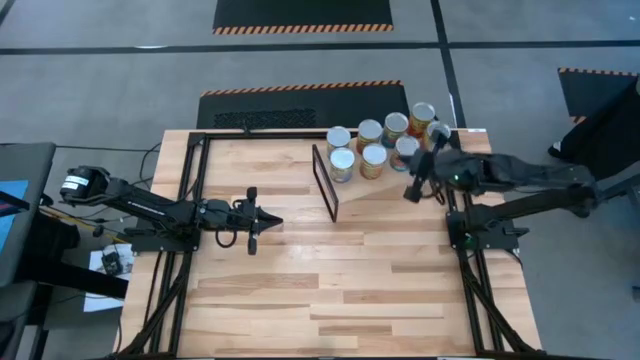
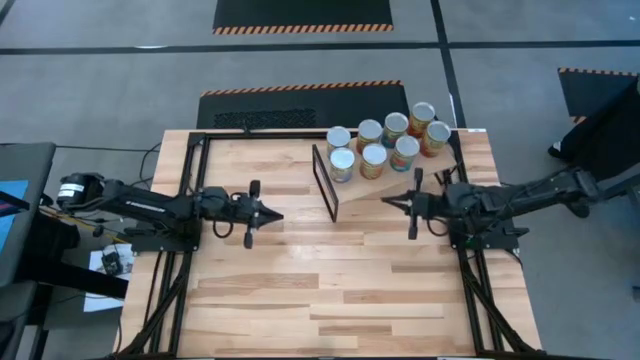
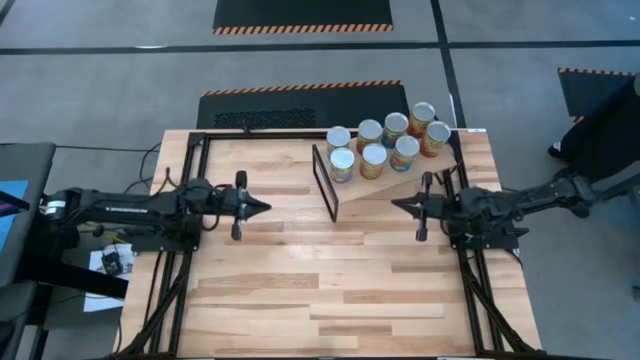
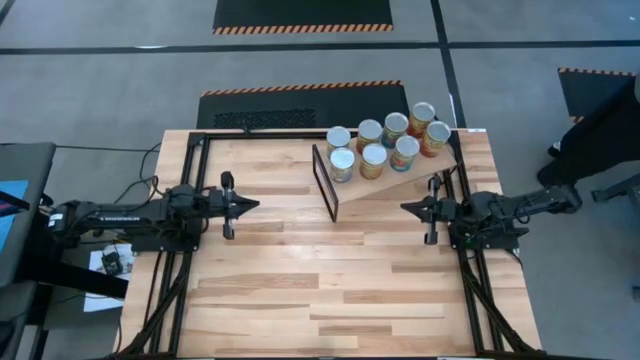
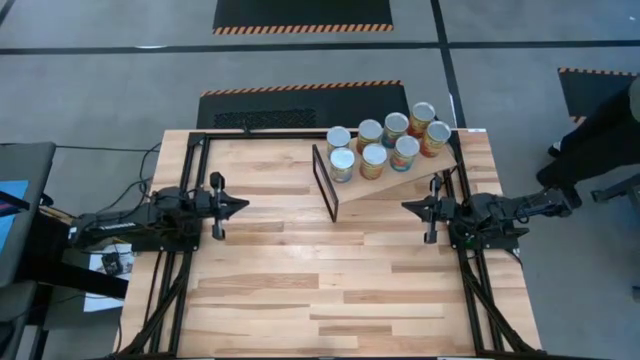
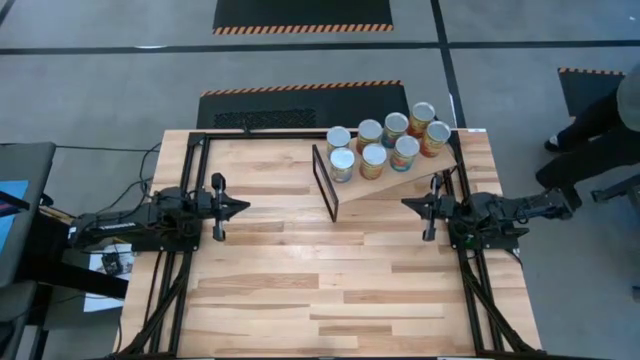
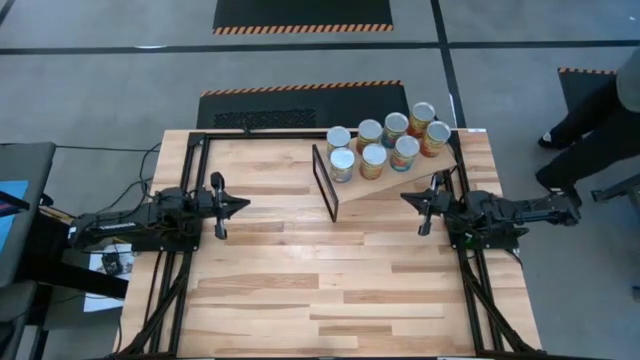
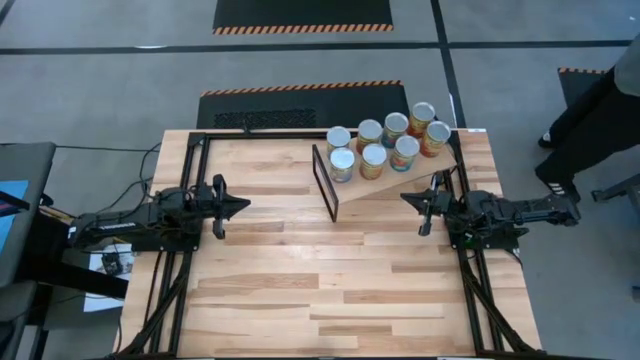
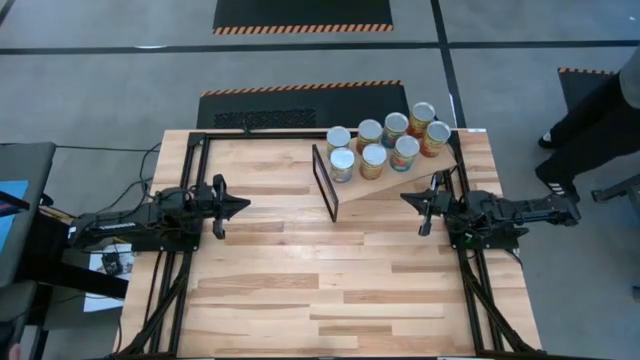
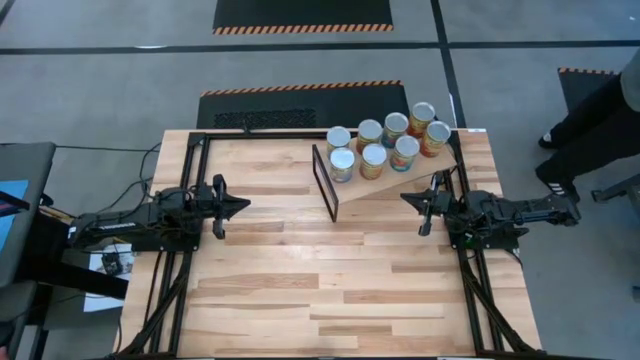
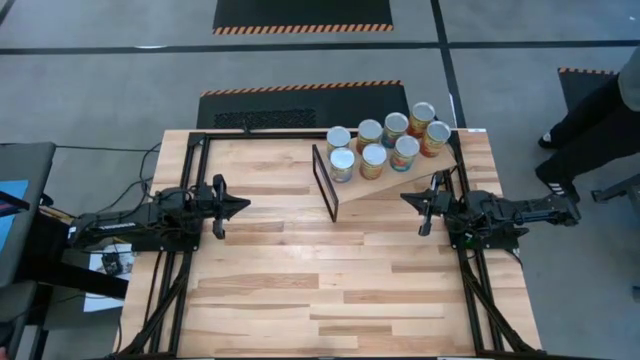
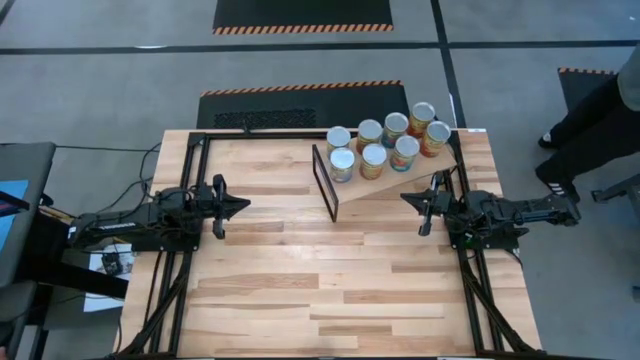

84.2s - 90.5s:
Task: Pick and place cans onto a shelf
Return to Home Position

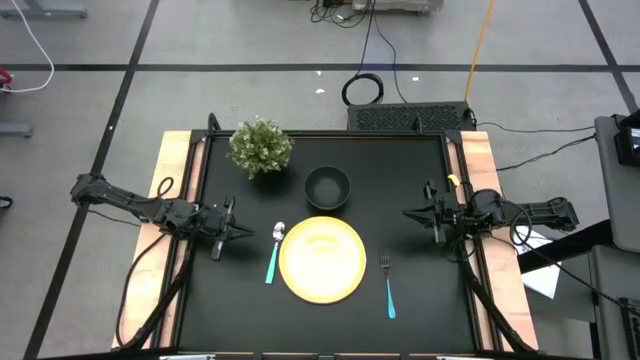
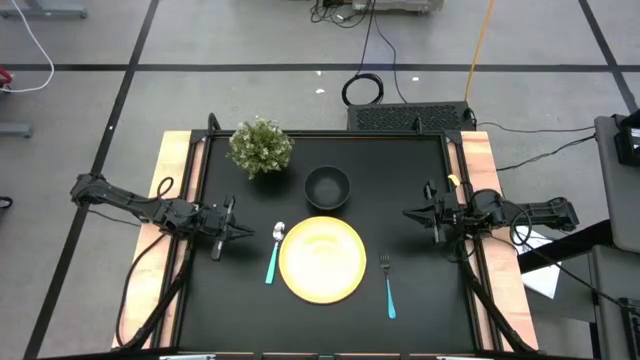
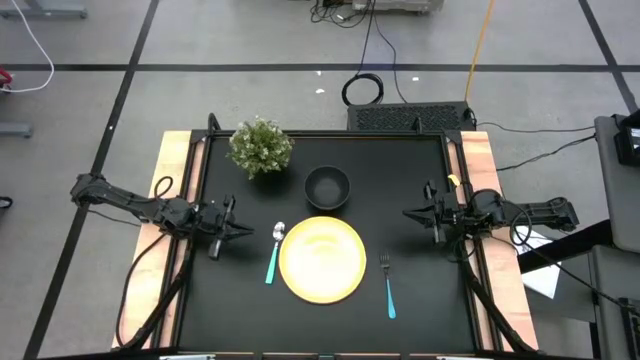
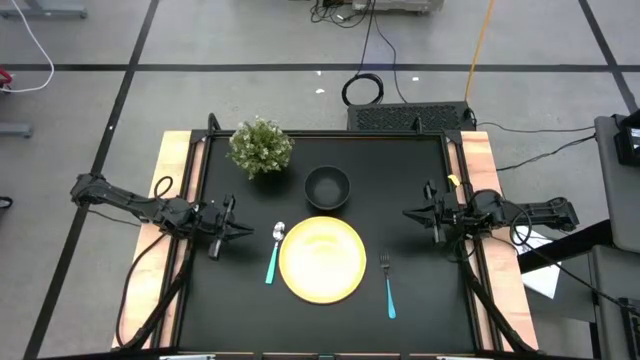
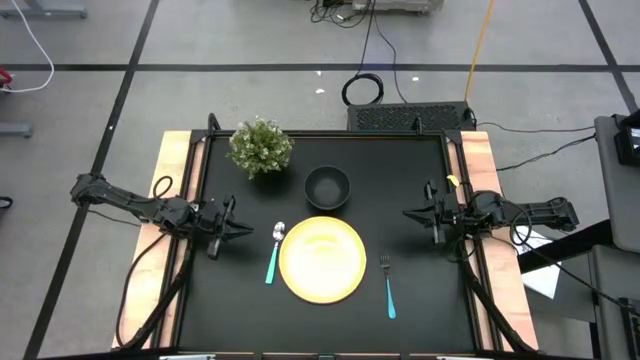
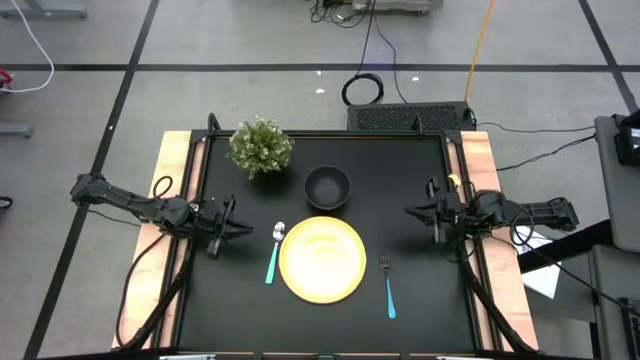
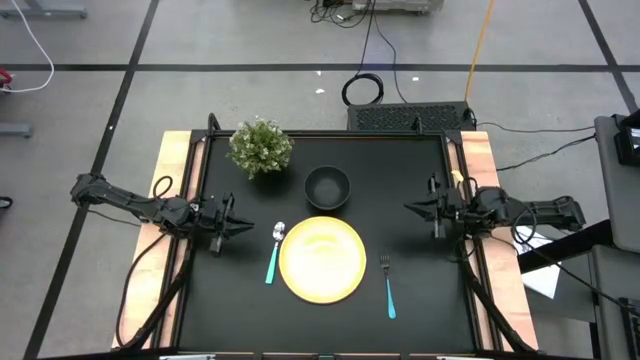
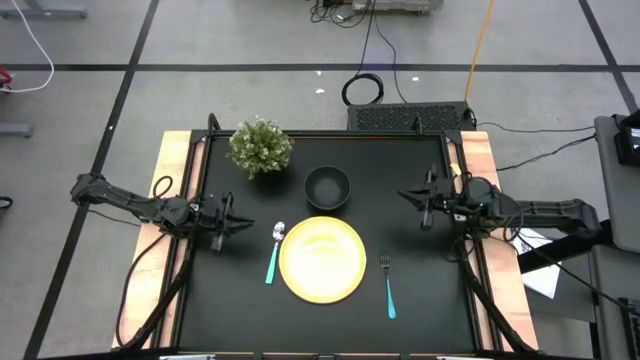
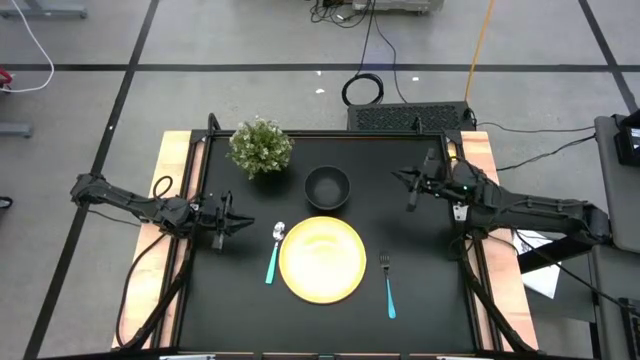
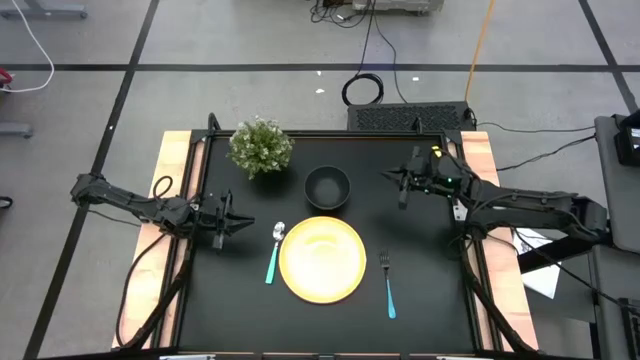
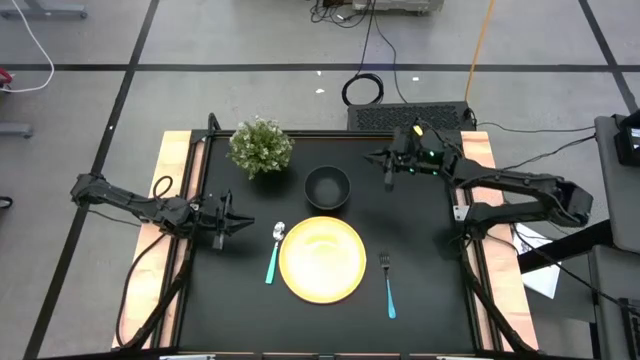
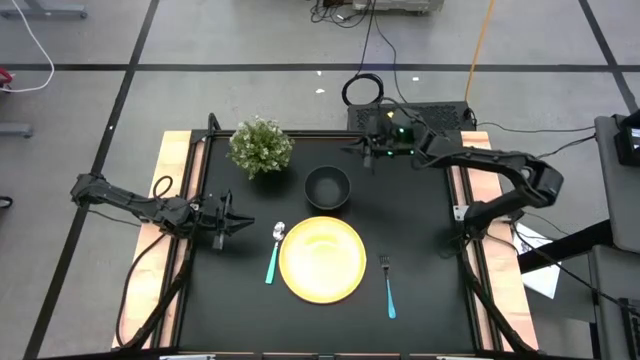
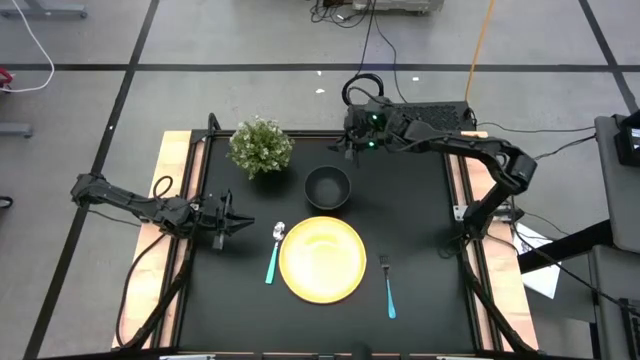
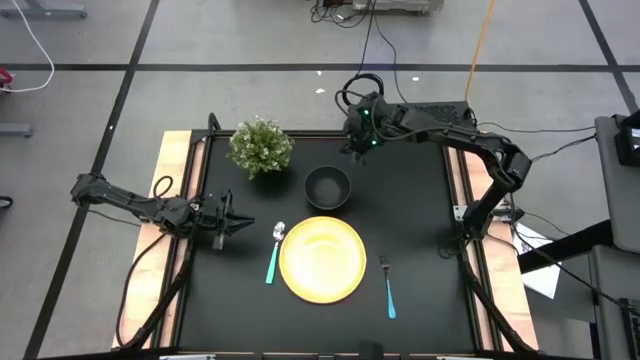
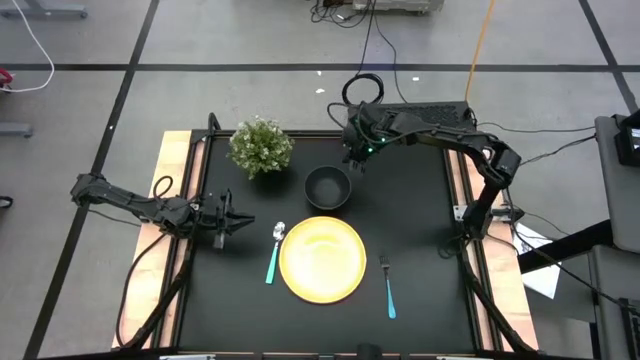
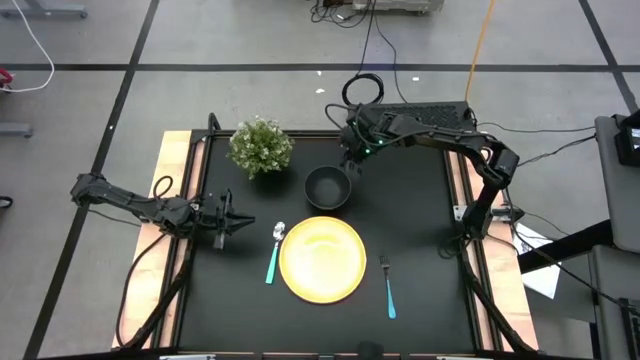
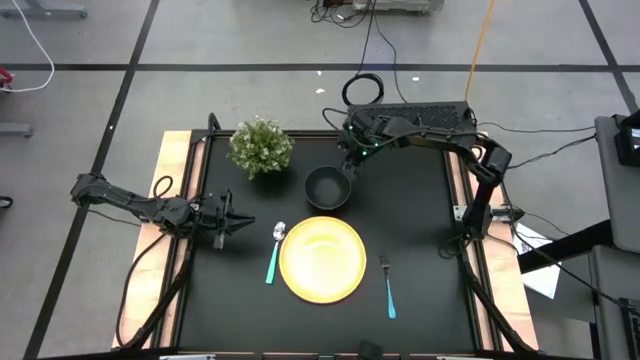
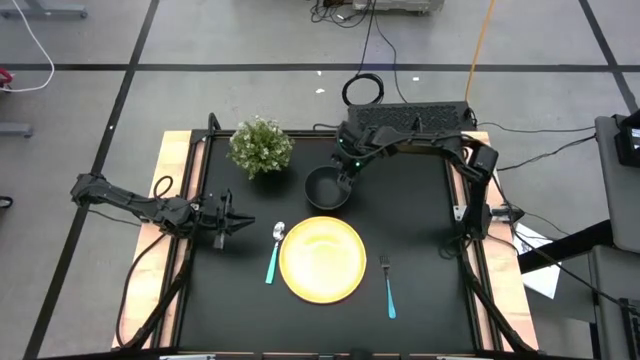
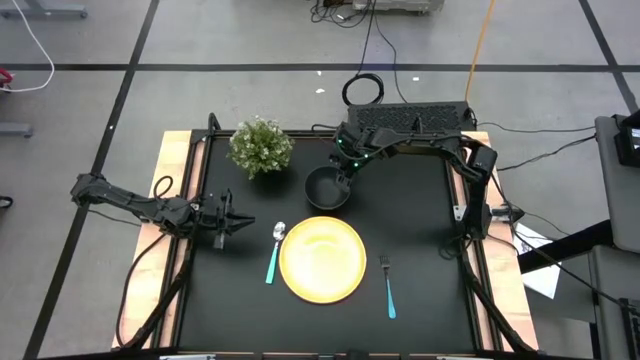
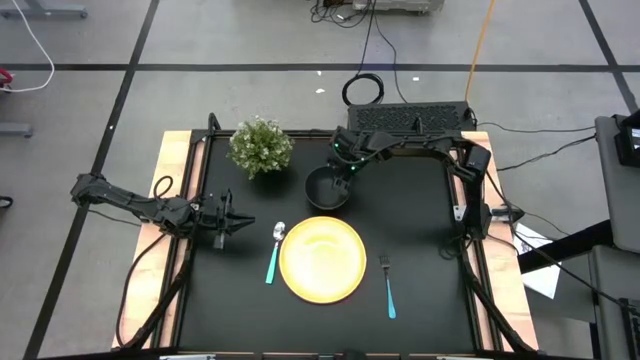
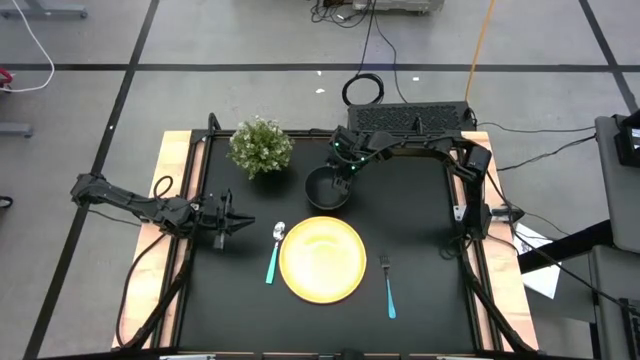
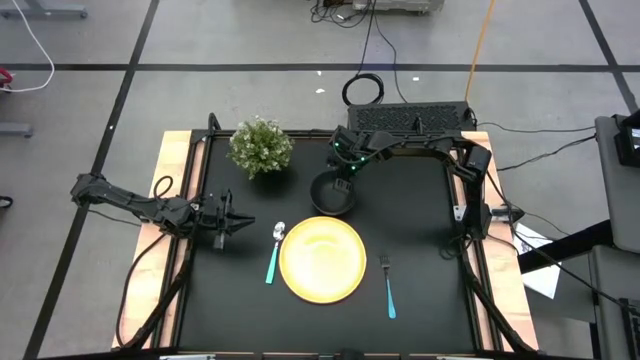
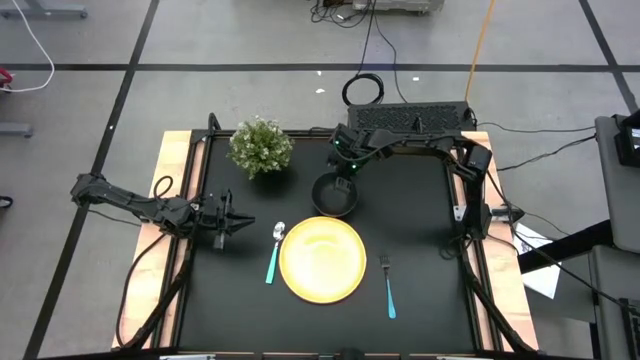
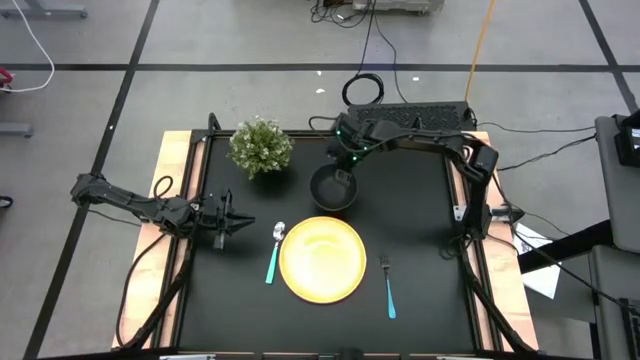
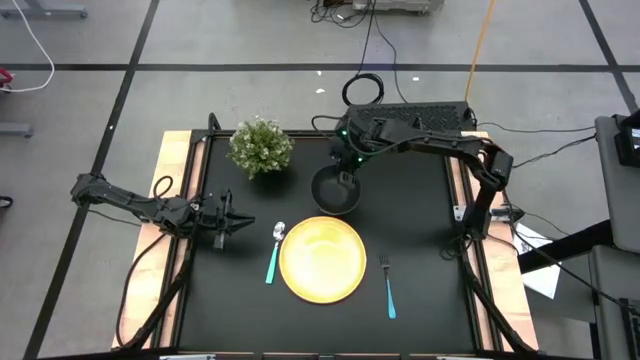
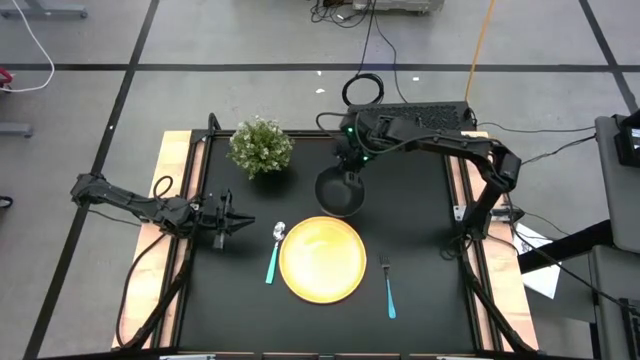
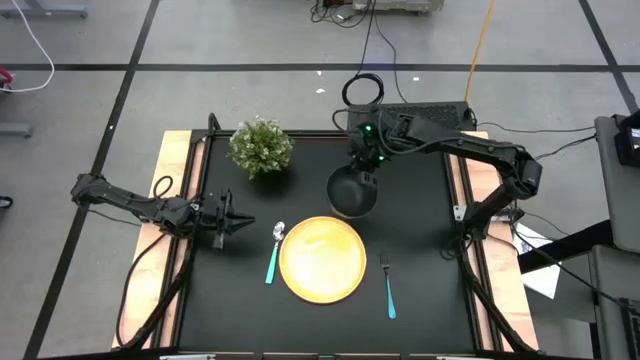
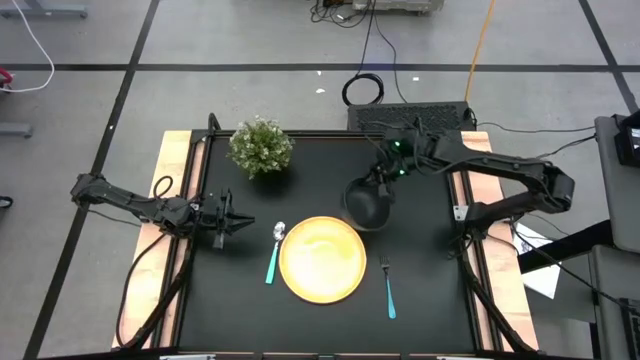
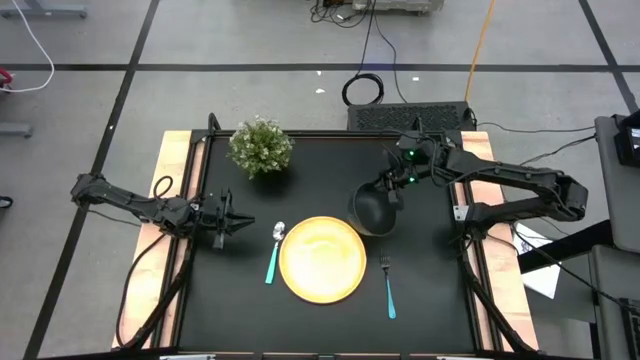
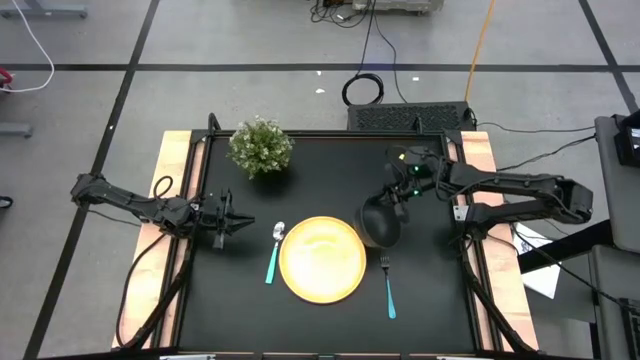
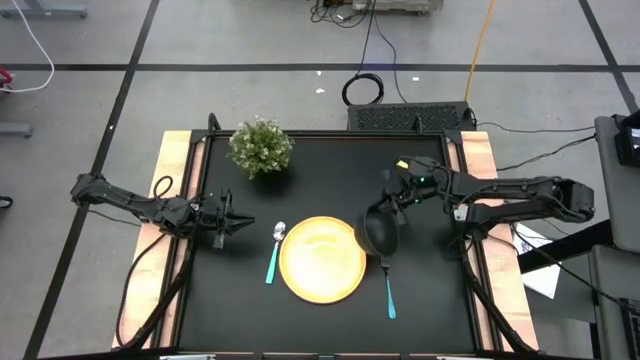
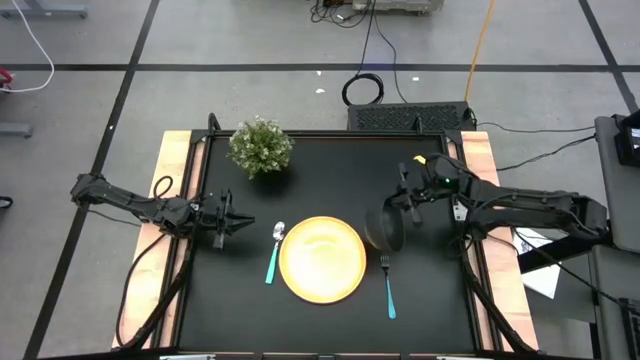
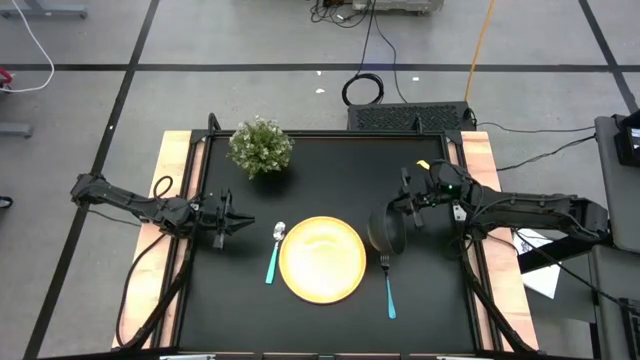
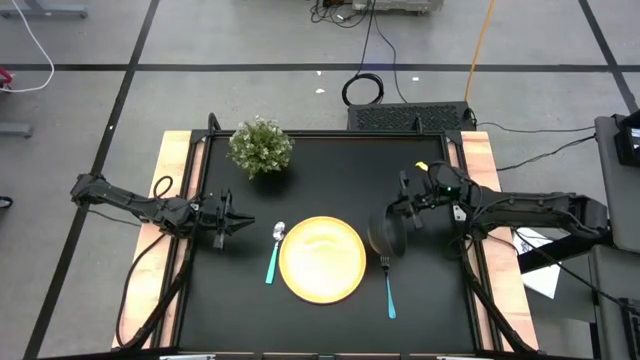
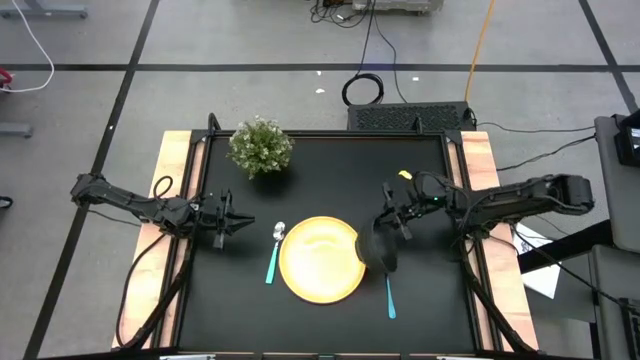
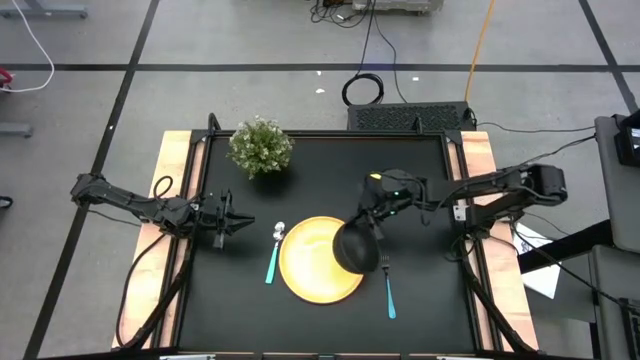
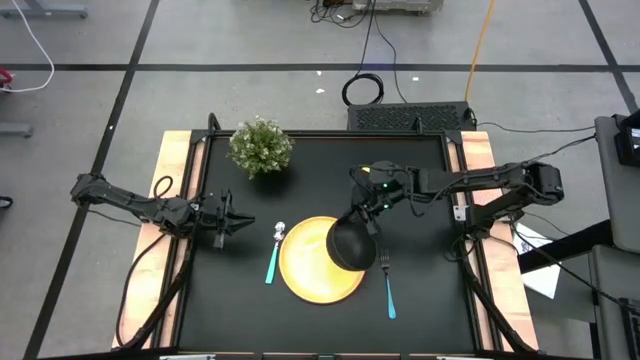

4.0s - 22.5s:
Task: Set table place
Put the black bowl on the yellow plate
